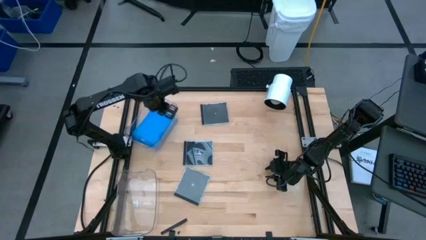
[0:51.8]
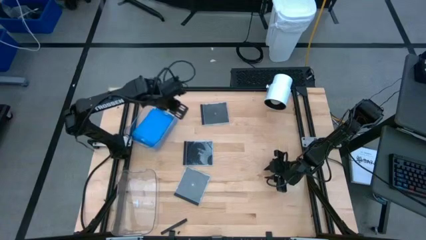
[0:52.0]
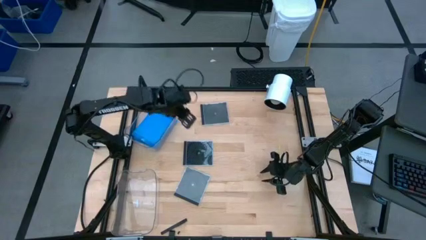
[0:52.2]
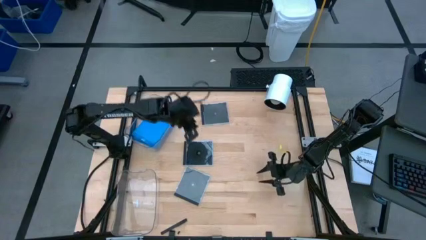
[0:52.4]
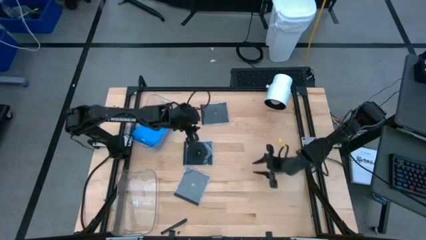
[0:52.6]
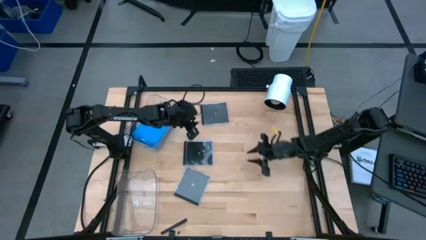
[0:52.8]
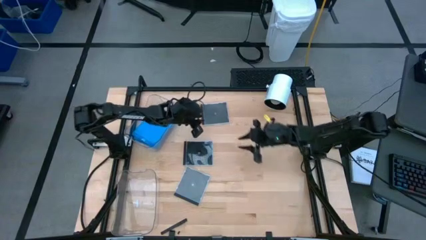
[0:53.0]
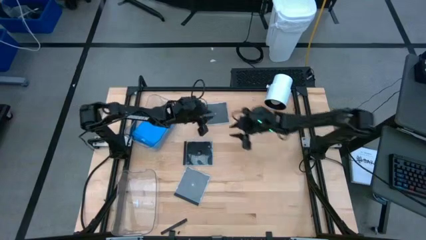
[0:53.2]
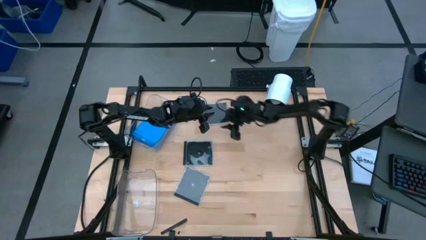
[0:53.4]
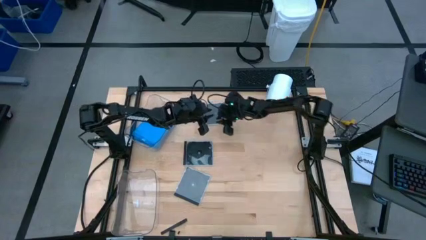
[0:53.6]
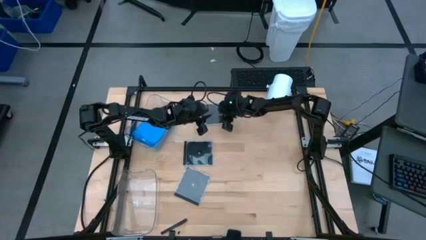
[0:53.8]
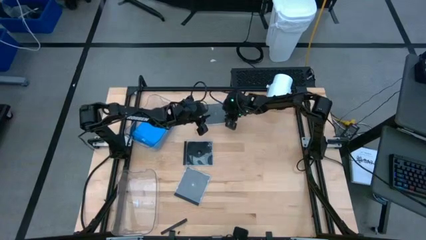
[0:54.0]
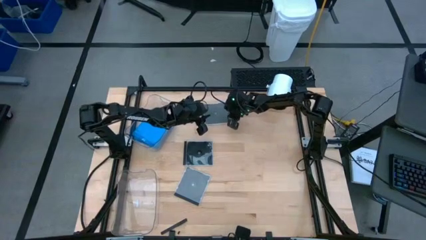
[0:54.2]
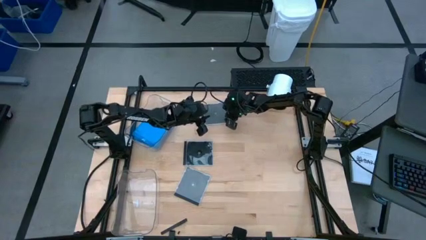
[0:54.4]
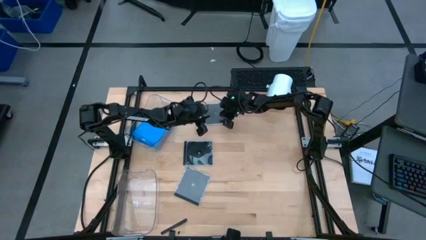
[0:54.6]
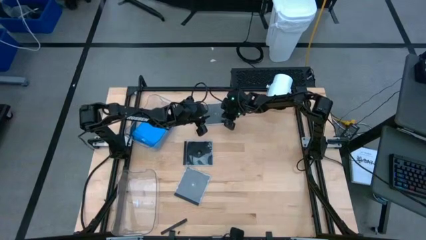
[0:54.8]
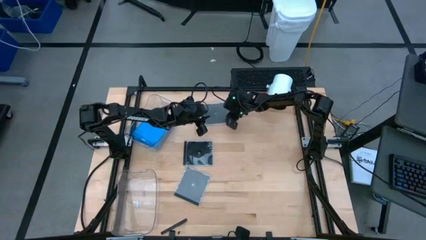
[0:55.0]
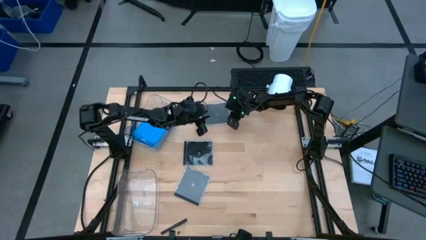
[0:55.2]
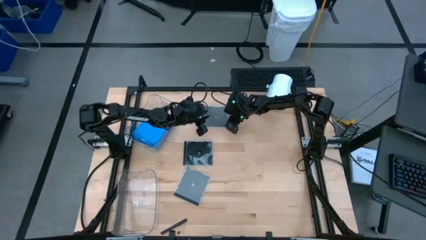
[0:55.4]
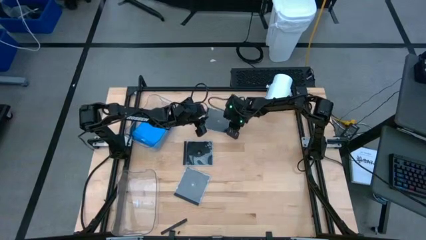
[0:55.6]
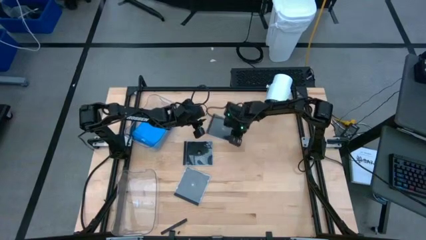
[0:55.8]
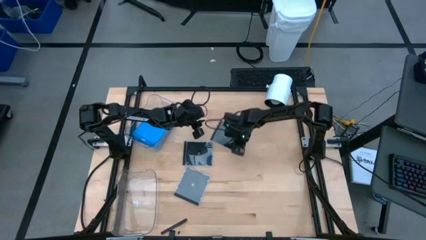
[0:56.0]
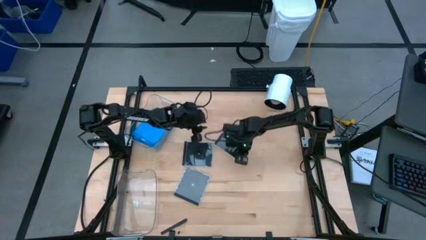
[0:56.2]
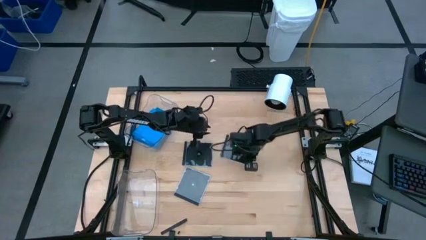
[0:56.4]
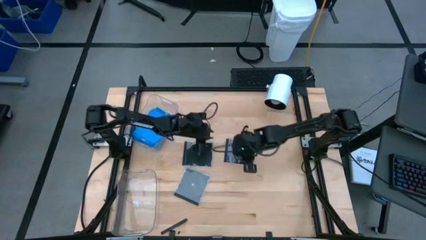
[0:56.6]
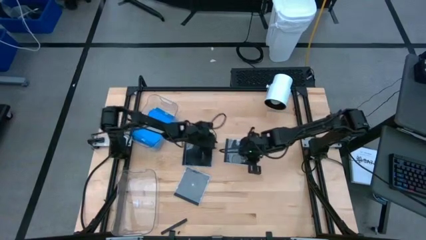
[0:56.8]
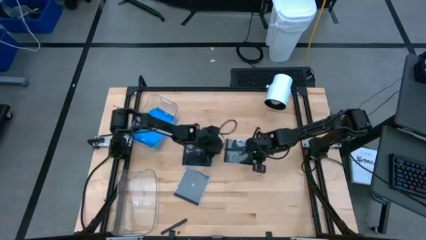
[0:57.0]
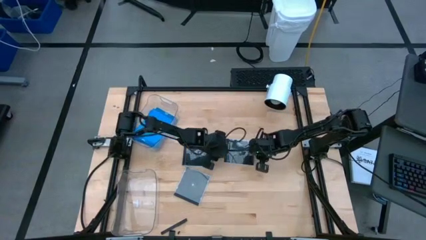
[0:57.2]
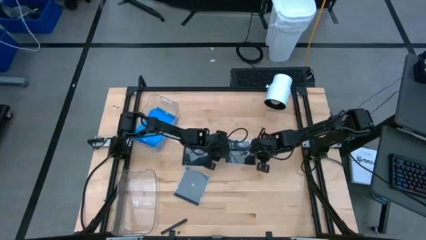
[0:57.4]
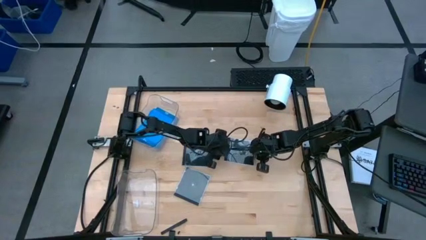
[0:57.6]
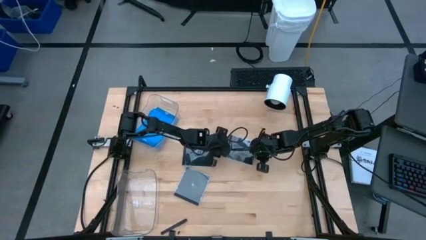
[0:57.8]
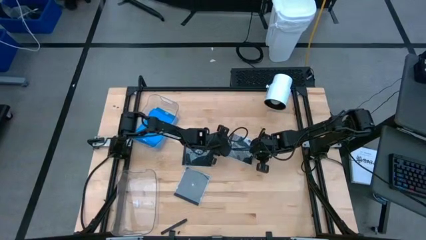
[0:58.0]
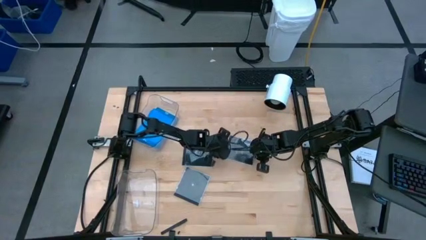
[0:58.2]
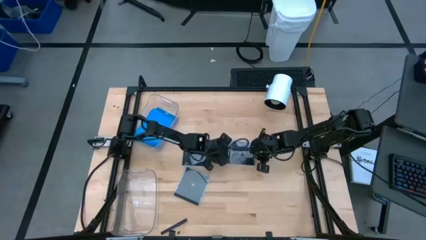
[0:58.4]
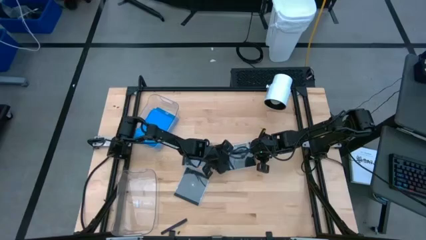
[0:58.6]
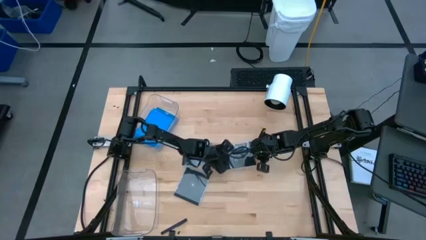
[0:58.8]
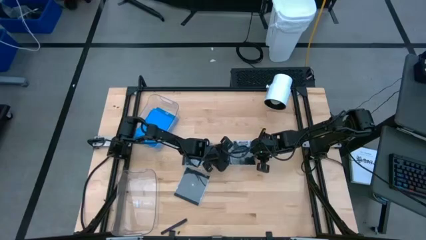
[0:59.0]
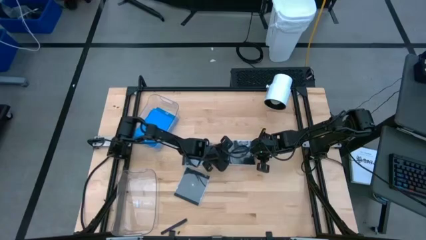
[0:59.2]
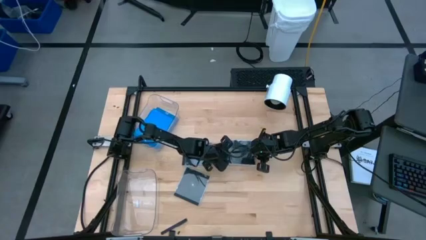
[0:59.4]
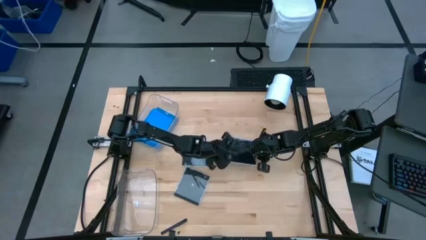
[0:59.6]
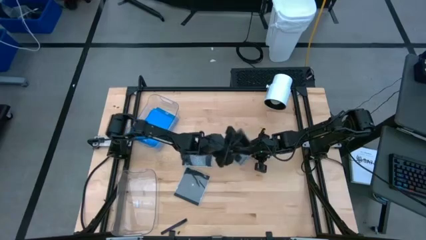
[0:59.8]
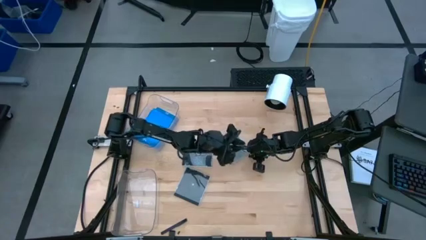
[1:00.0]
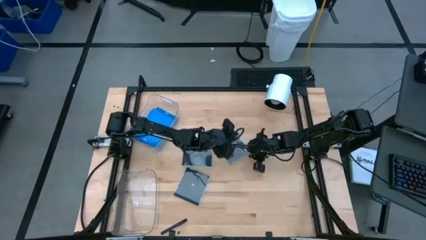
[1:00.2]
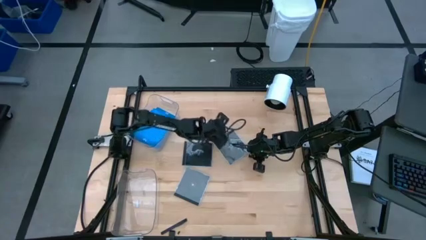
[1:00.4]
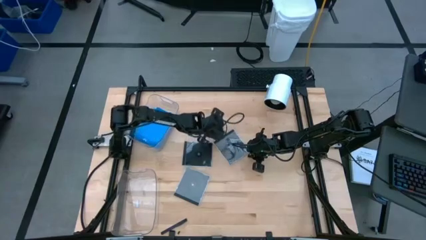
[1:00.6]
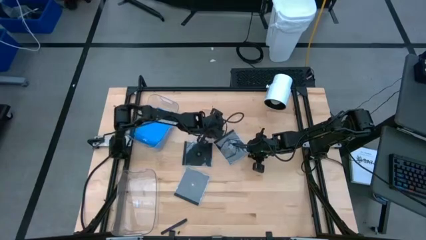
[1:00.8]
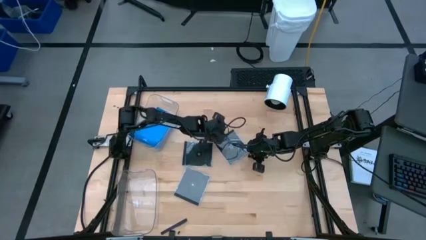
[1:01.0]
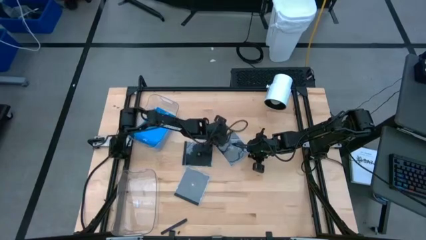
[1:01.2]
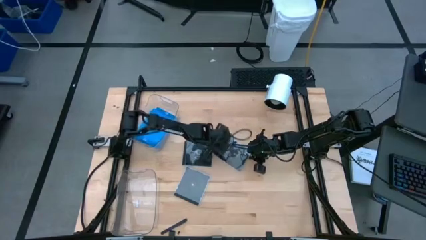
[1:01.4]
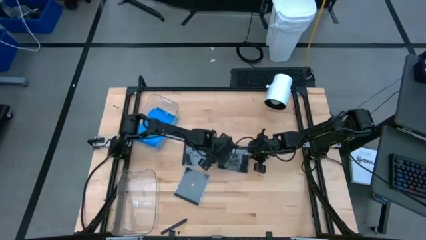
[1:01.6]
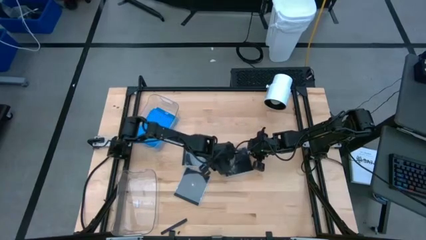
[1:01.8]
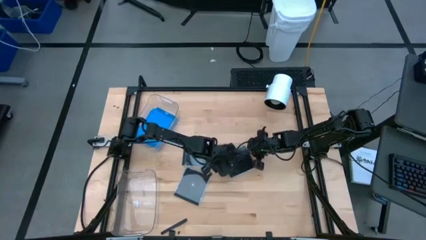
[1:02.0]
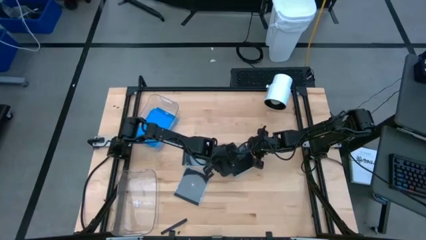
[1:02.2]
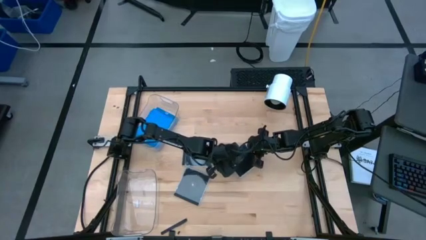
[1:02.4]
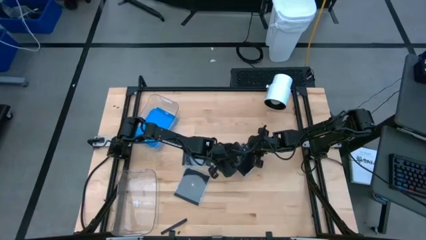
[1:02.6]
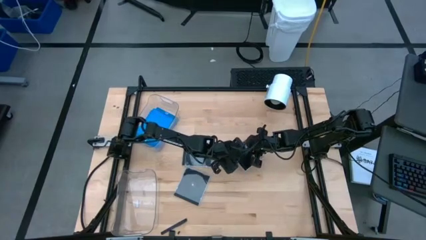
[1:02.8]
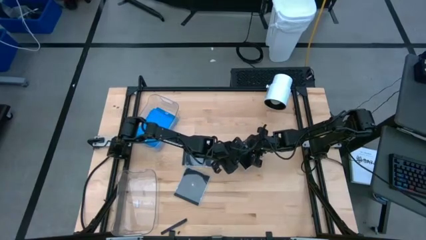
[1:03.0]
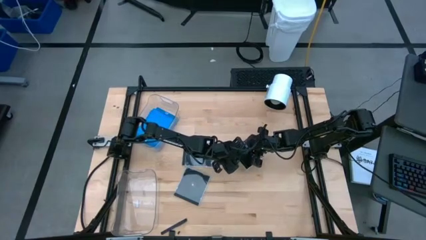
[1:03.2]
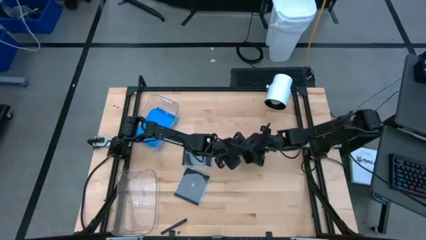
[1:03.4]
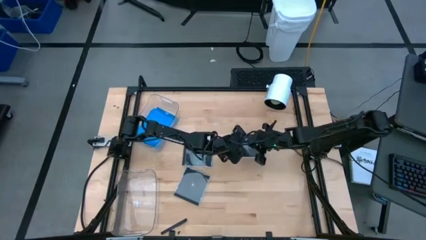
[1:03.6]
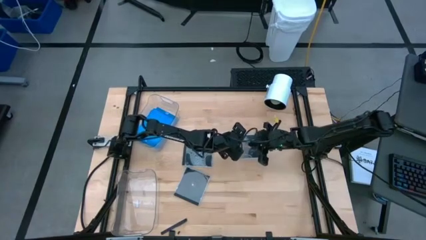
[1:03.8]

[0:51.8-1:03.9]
Task: Pick & place jewel cases by type
Put the top black CD case into the bottom transparent bin
